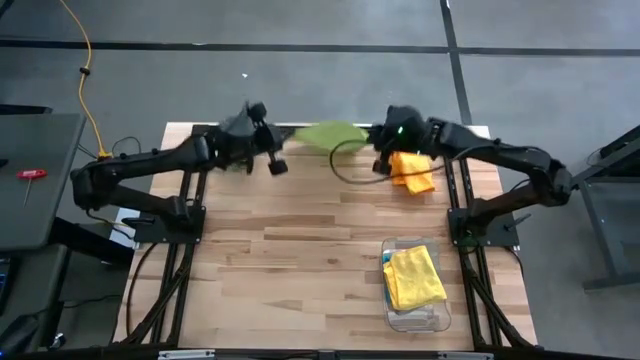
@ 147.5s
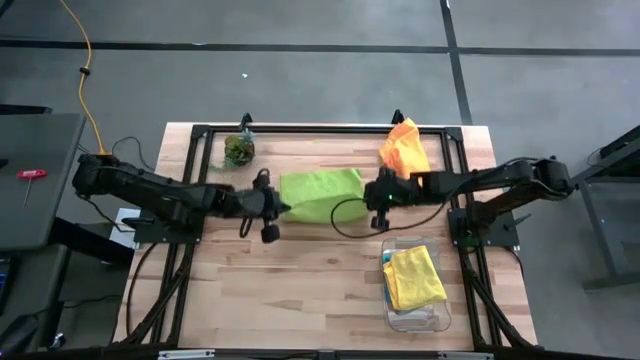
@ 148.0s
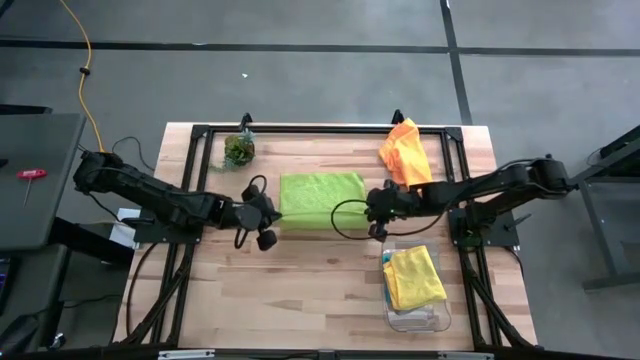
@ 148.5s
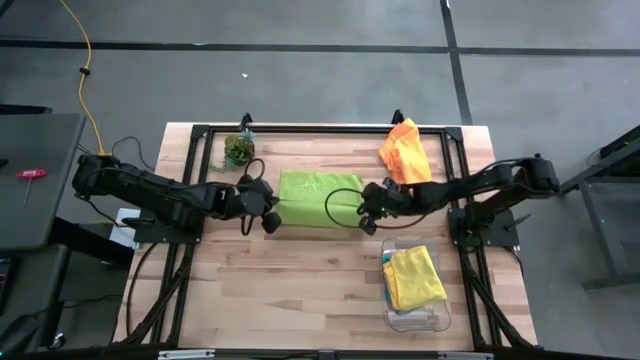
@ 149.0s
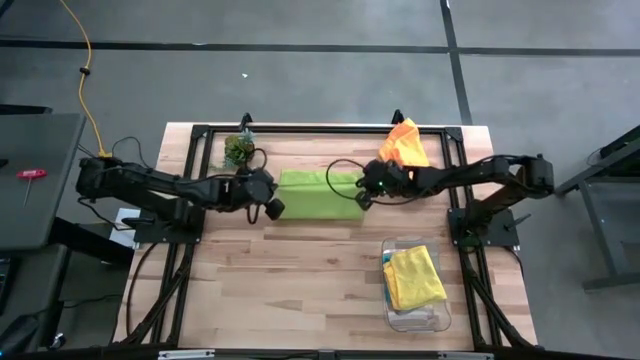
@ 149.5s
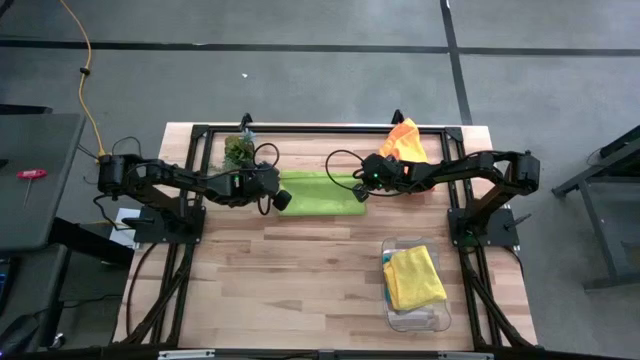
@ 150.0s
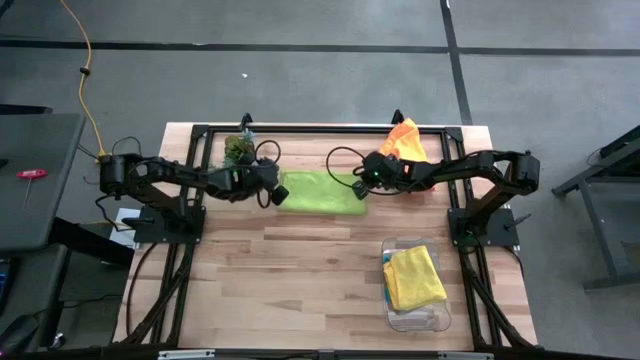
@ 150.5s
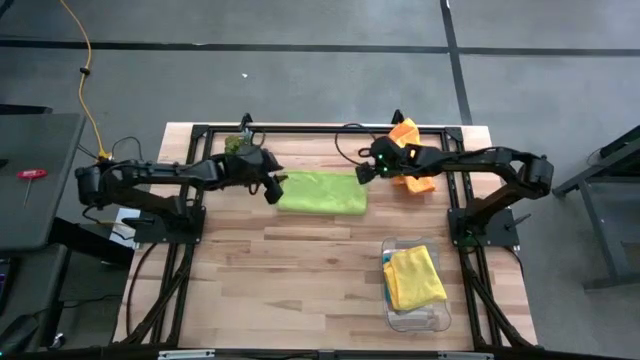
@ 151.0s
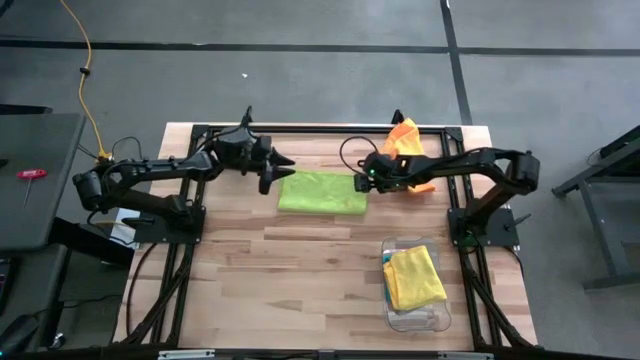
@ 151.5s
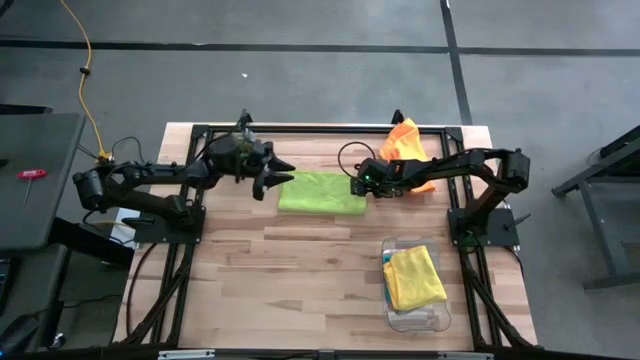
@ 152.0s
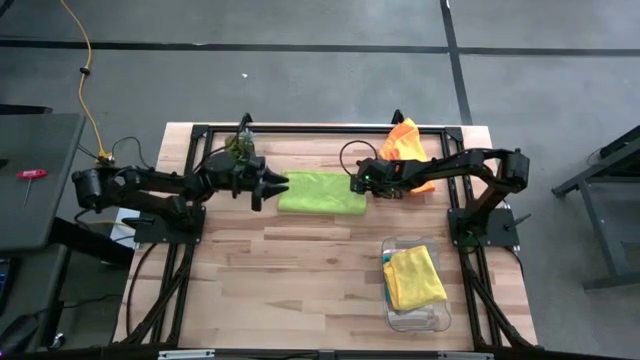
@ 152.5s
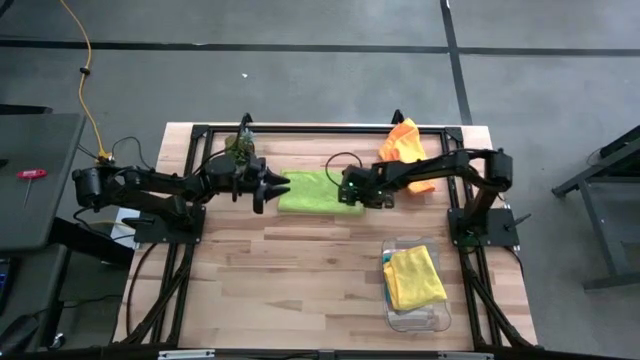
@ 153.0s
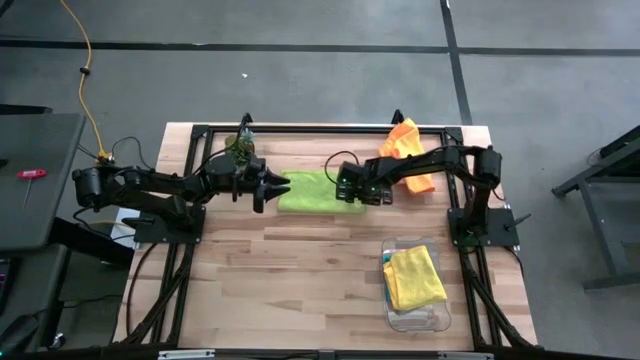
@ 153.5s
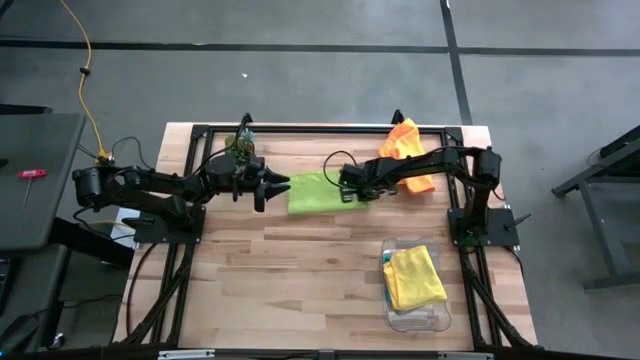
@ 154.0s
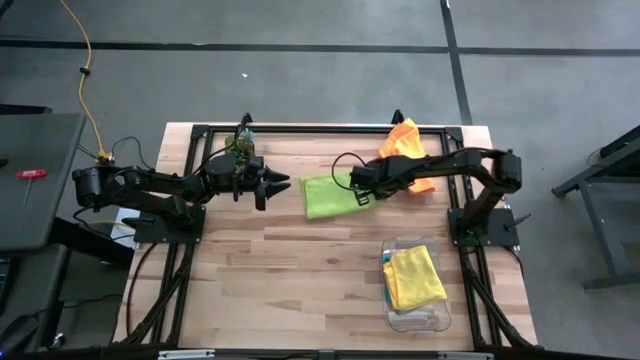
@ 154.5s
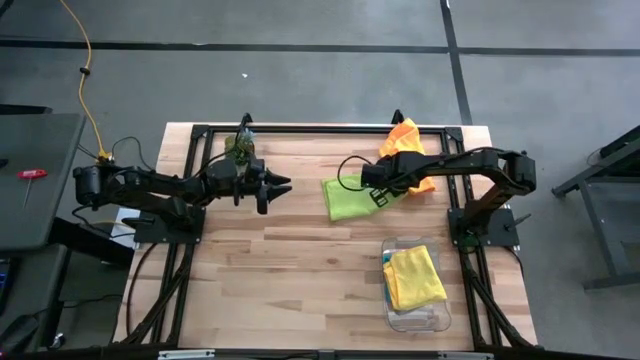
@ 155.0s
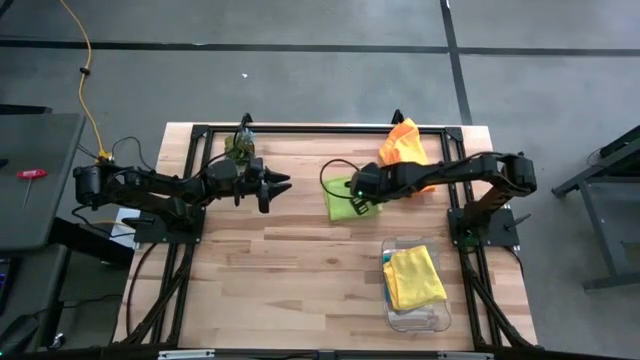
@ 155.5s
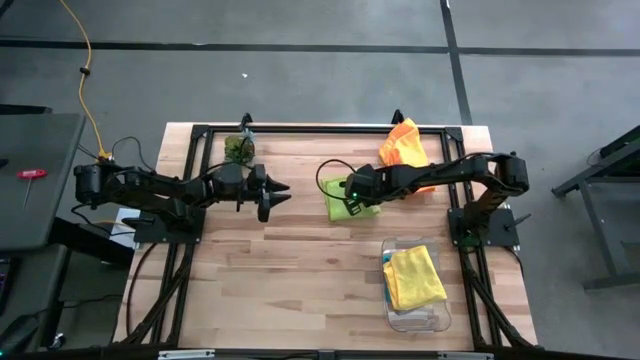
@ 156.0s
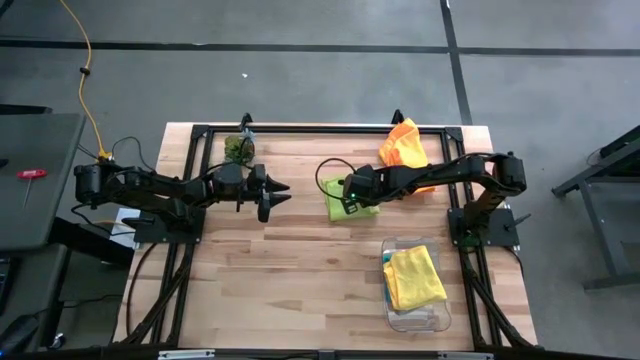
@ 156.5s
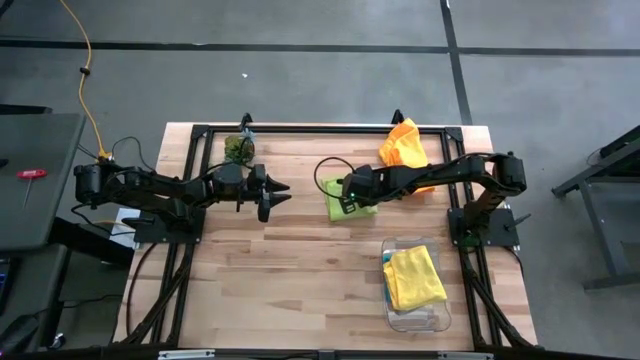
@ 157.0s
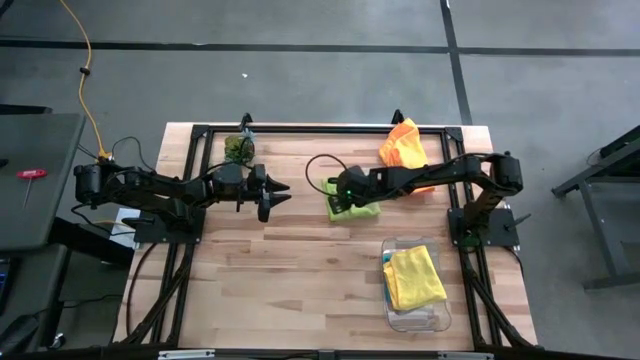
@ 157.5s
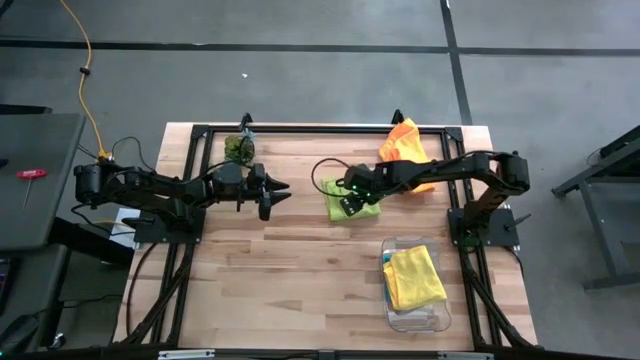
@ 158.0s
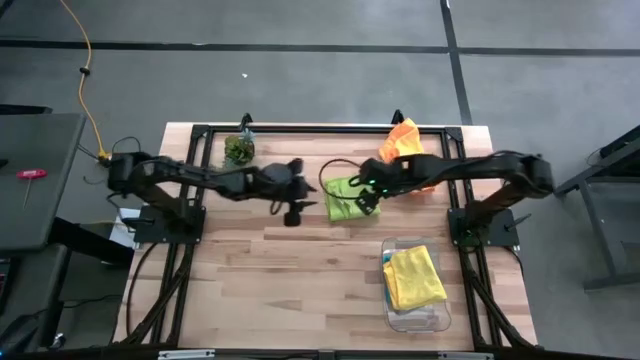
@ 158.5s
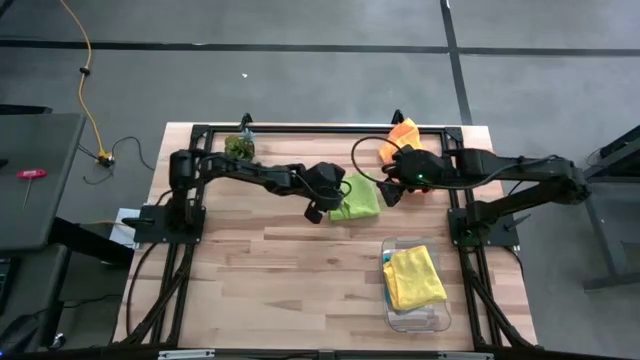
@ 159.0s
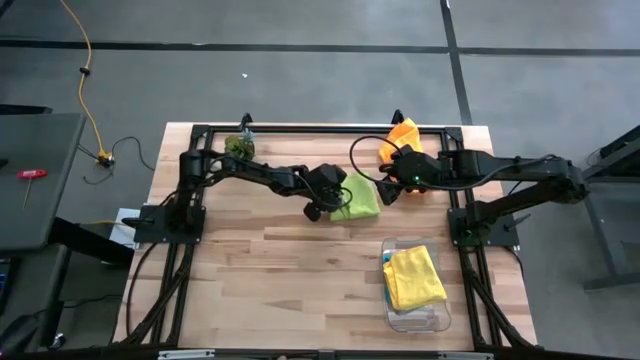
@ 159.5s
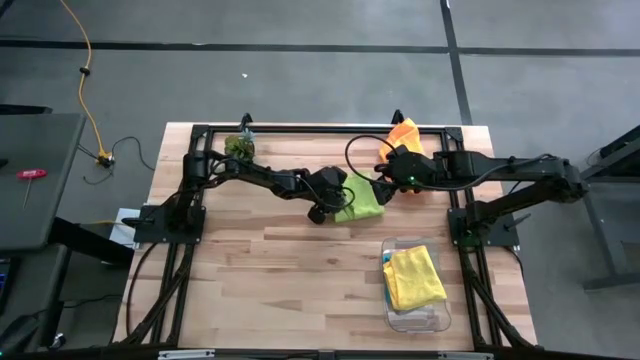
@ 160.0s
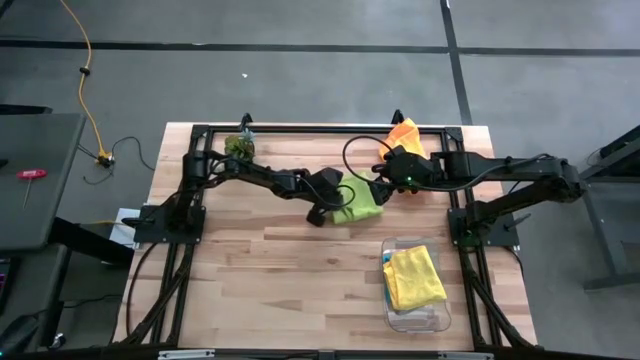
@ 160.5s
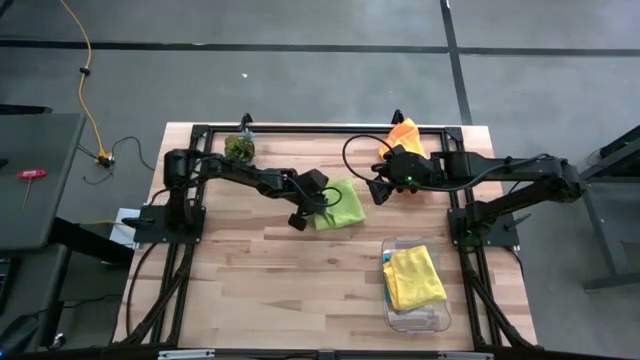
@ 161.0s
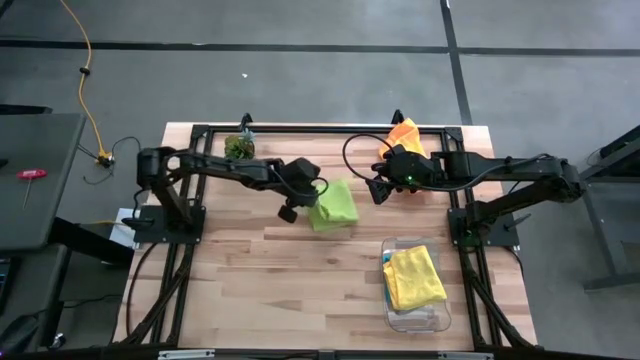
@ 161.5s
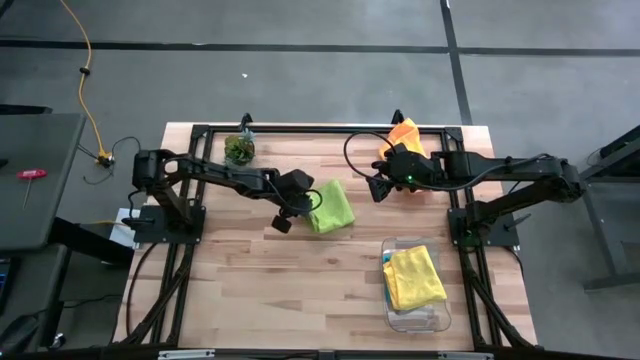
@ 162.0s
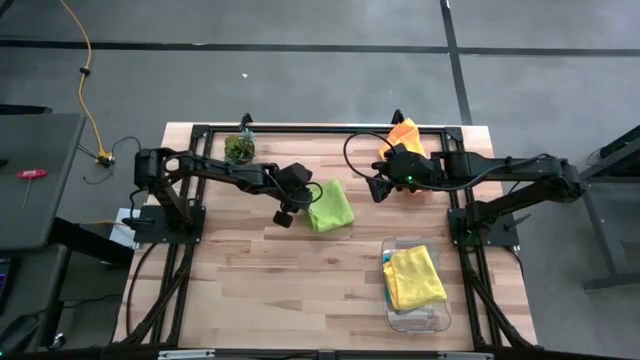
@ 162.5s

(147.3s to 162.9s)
Task: Fold microfiber towels
Fold the green microfiber cloth

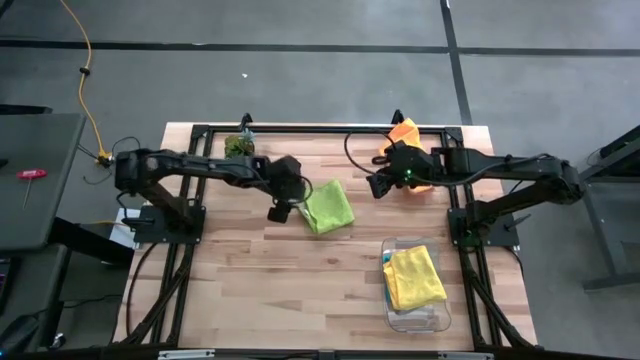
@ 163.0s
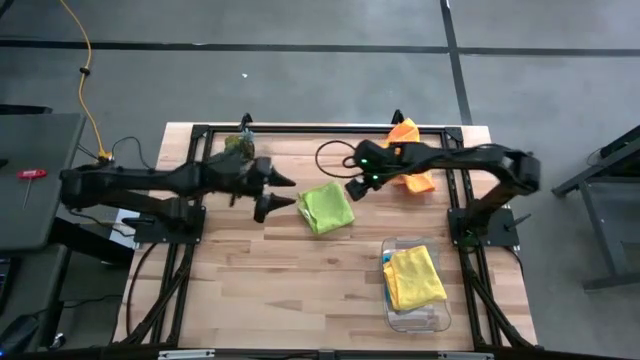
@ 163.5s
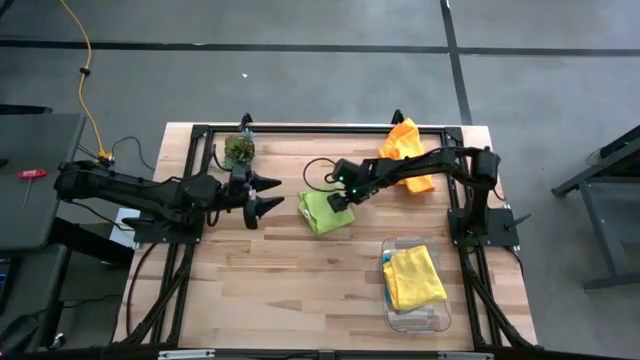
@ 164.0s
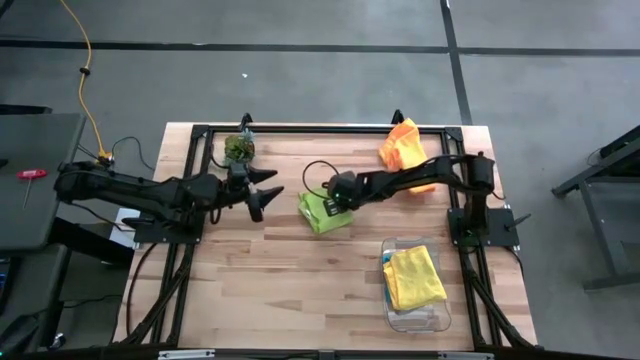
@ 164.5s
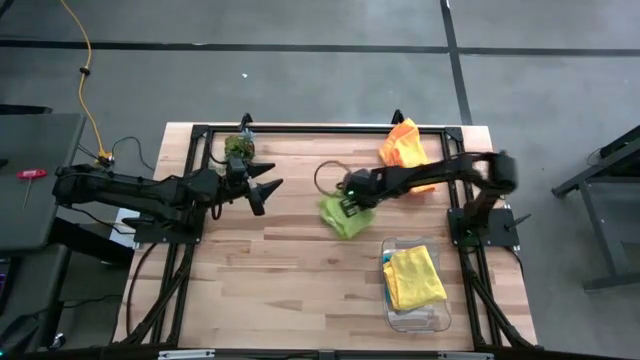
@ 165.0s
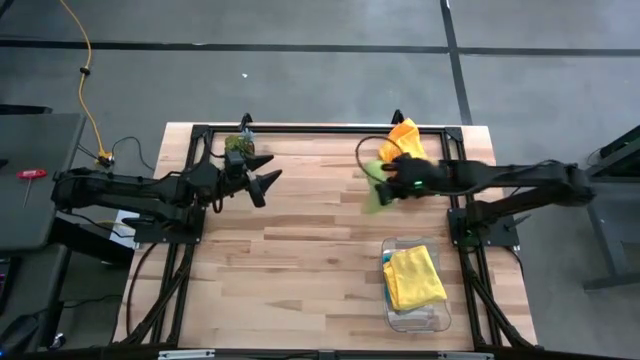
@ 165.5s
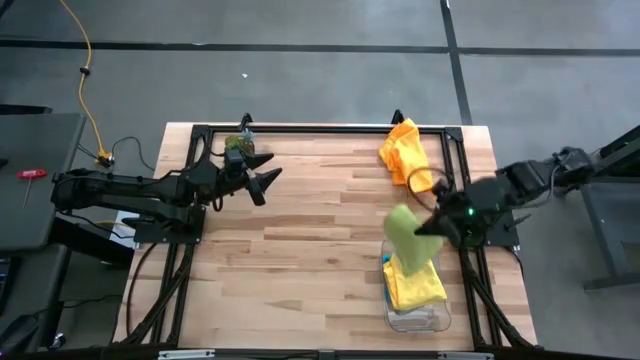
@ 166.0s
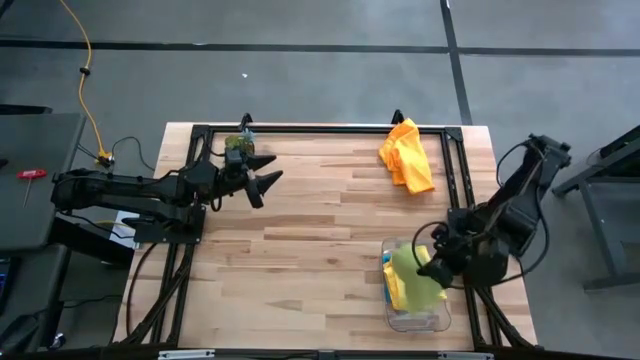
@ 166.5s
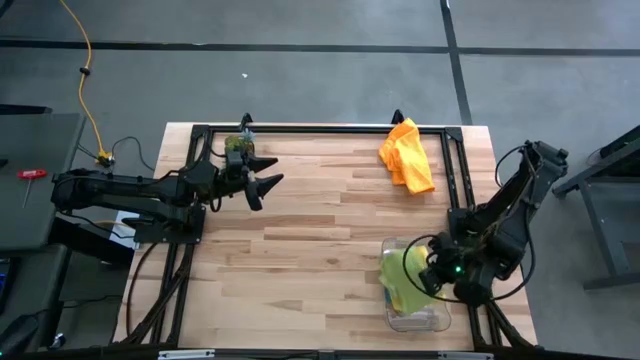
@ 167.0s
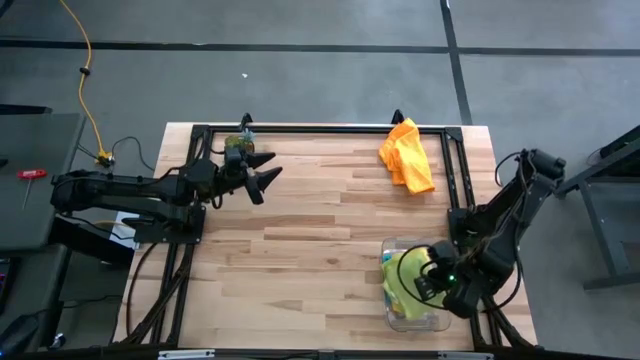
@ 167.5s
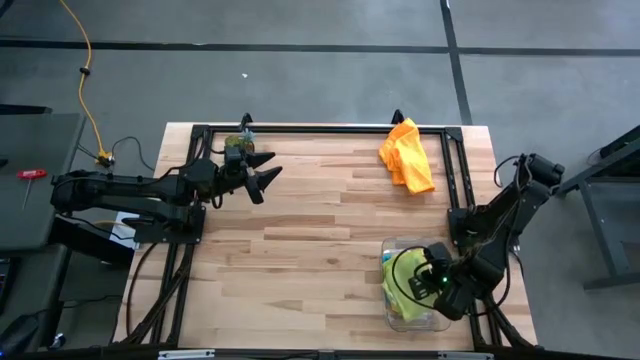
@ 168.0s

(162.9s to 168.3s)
Stack the folded green microfiber cloth on top of the yellow microfiber cloth in the transparent bin
